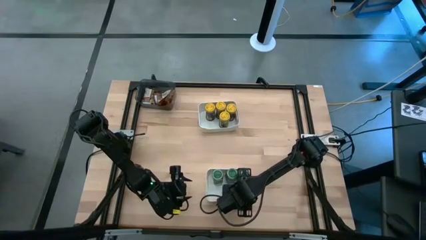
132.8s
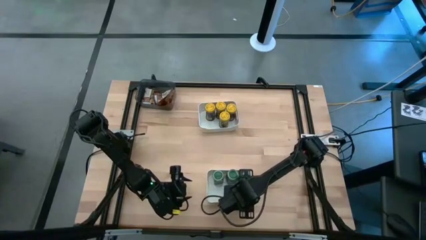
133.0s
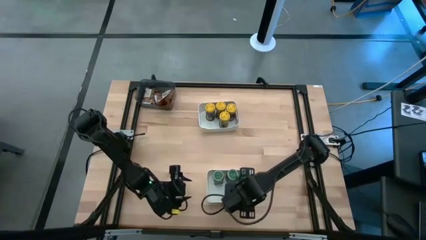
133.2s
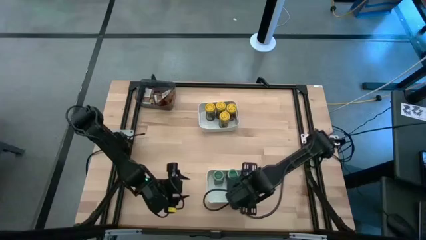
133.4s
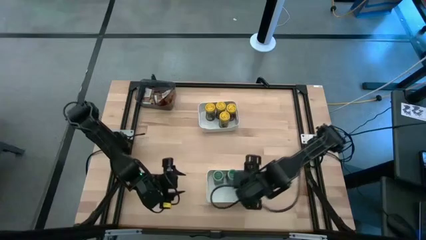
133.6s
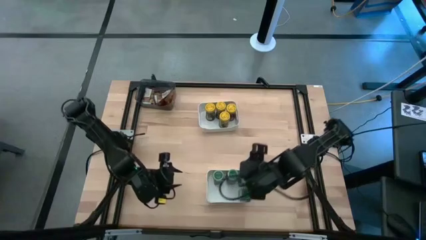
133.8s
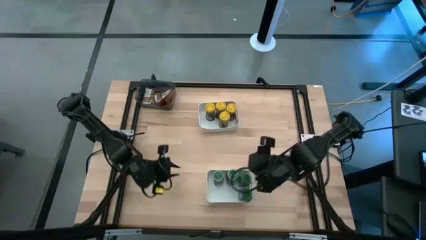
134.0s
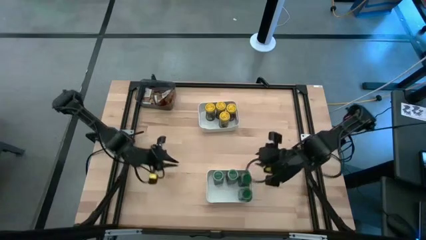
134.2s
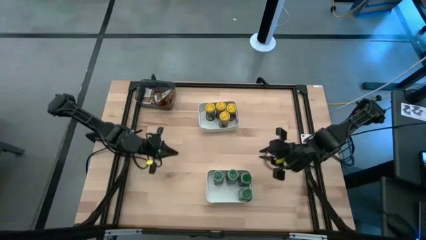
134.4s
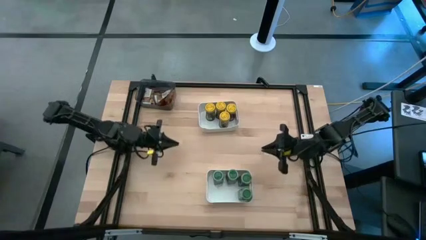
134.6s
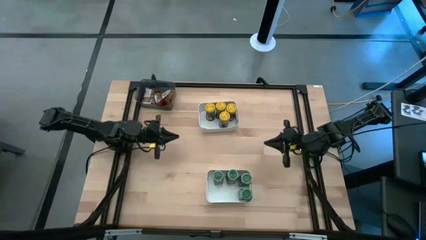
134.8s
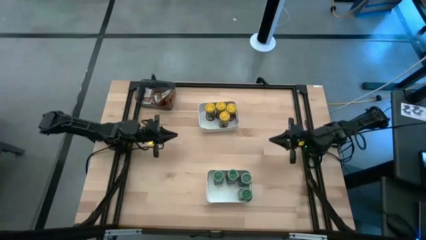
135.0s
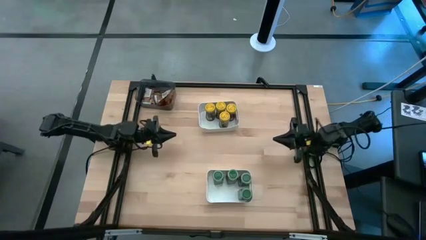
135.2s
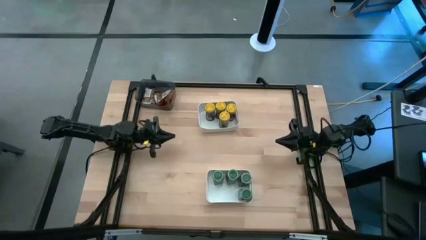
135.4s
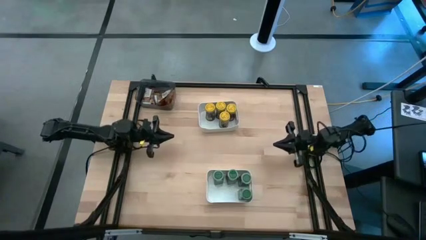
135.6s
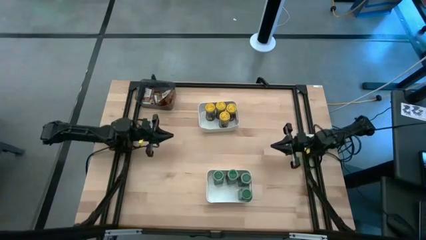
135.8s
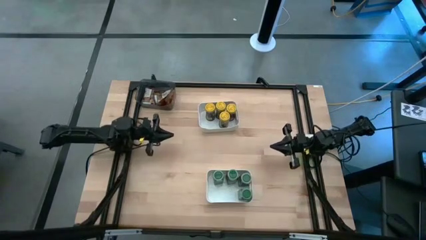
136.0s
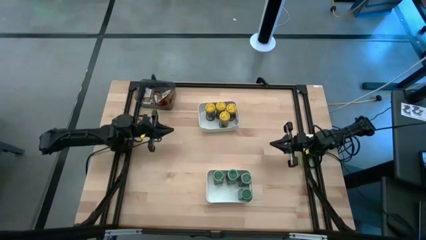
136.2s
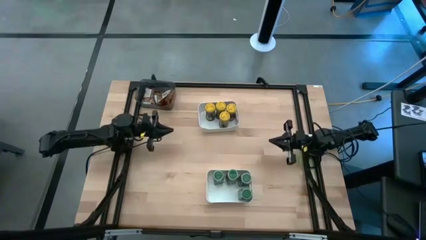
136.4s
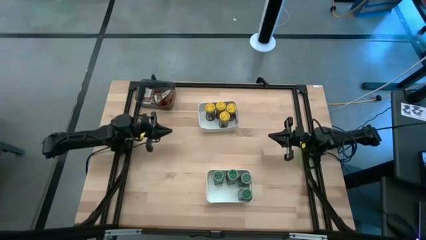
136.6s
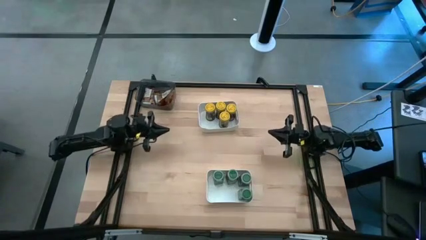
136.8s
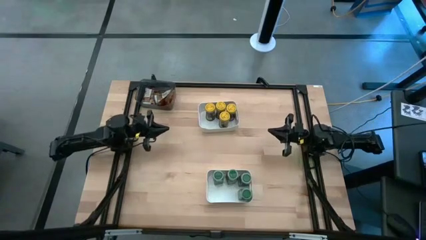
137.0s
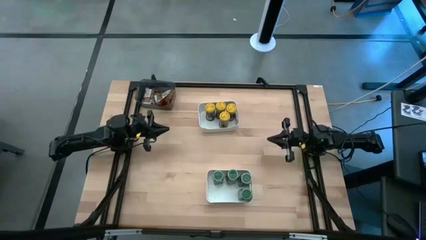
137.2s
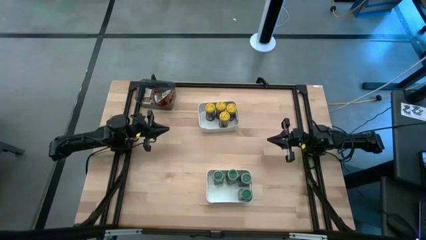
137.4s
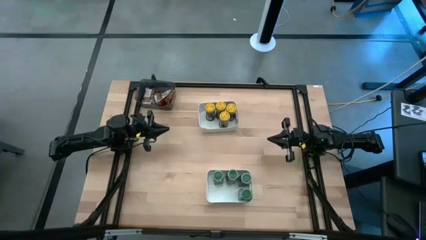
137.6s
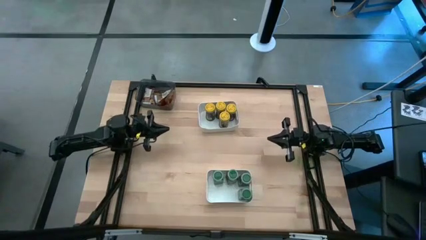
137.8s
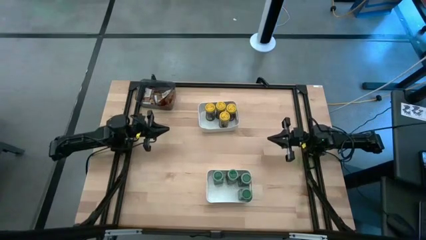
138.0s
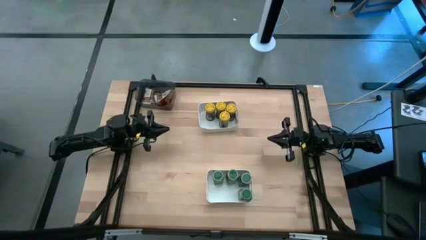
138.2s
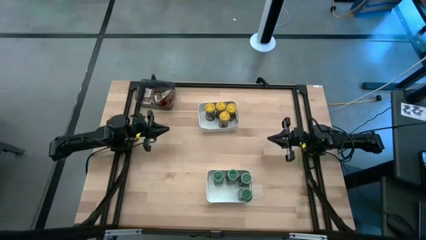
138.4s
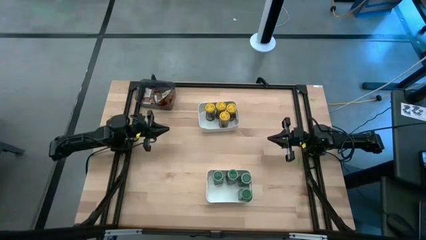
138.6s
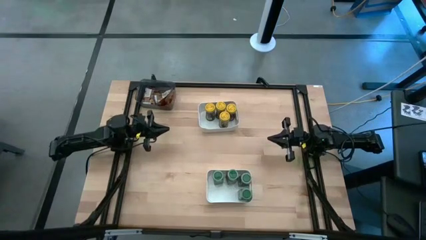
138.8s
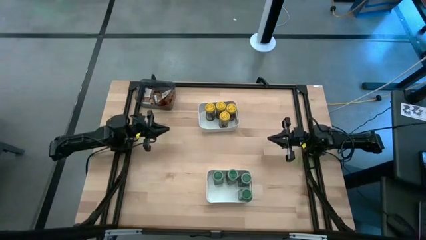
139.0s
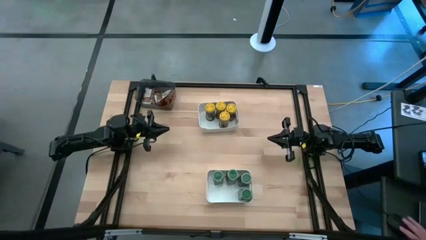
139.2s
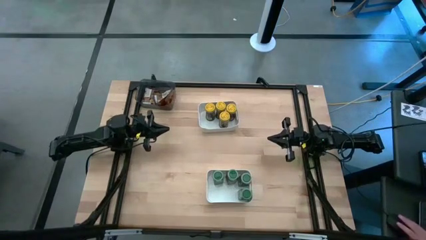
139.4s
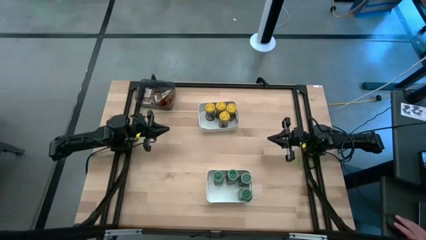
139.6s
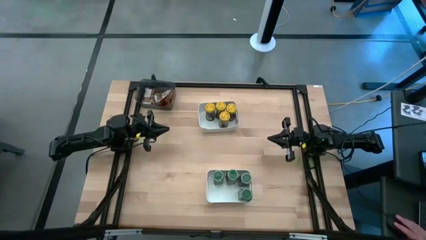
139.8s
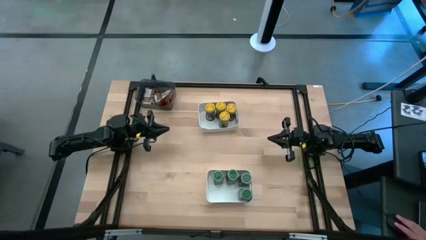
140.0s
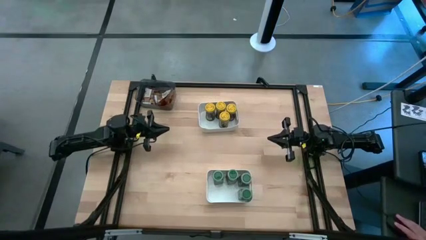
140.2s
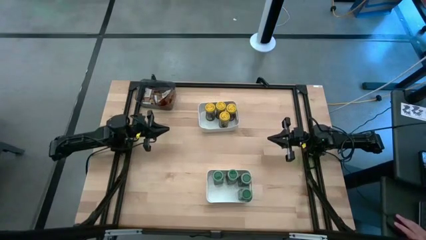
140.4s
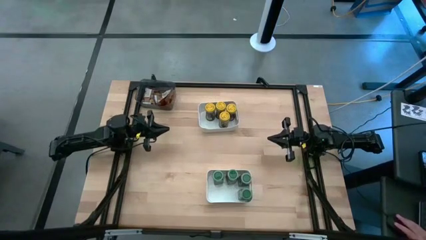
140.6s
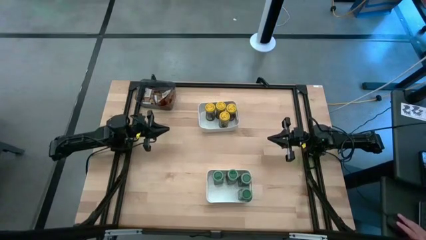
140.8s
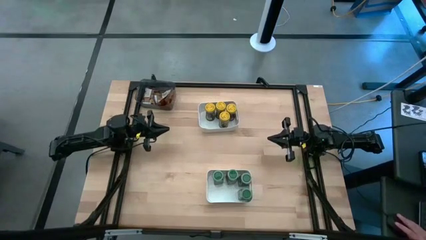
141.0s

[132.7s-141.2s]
Task: Sort spices by type
Return to Home Position

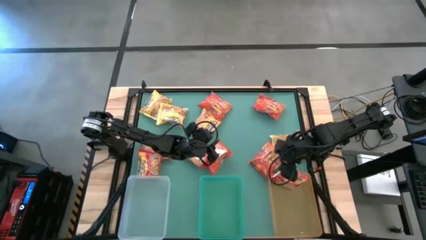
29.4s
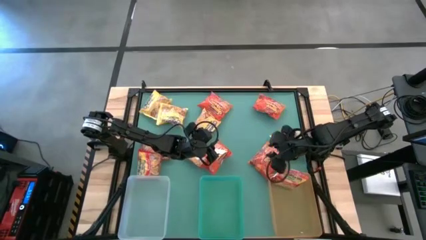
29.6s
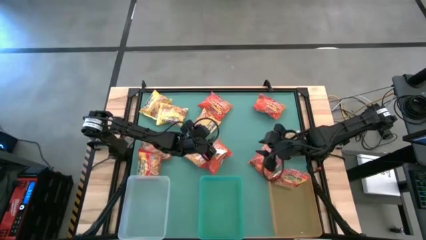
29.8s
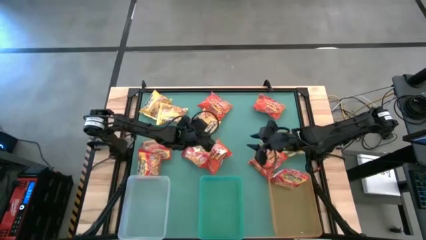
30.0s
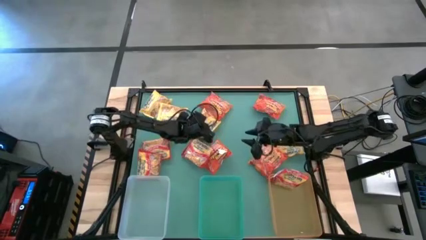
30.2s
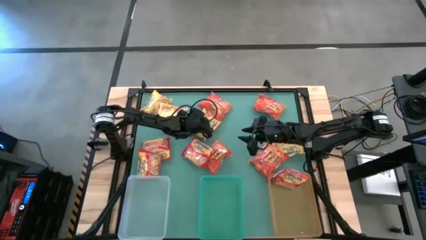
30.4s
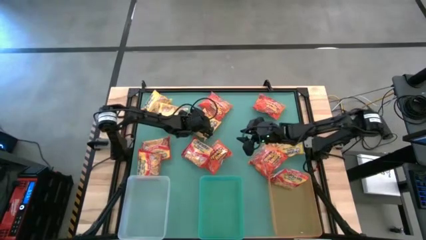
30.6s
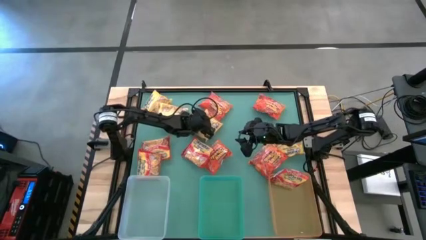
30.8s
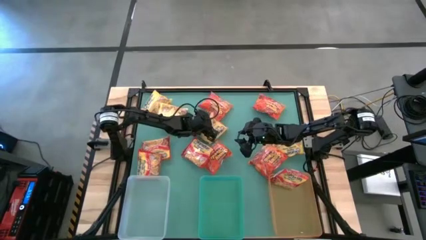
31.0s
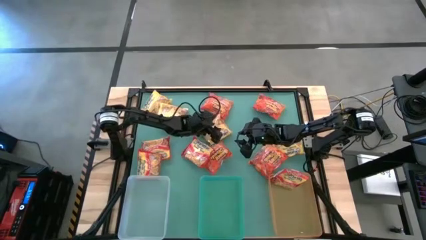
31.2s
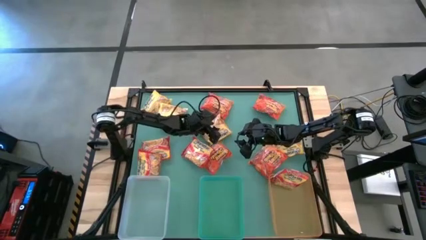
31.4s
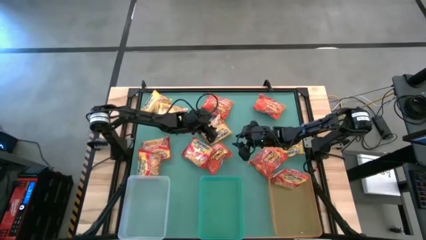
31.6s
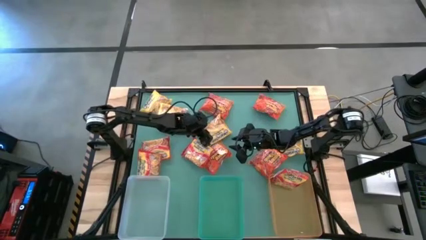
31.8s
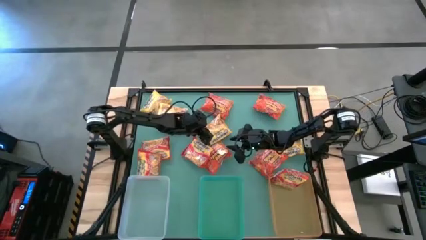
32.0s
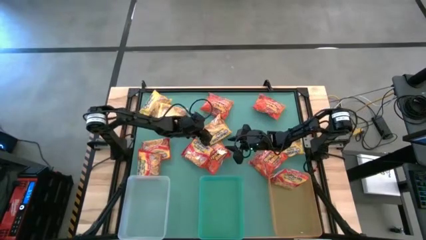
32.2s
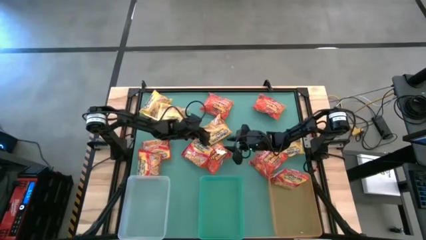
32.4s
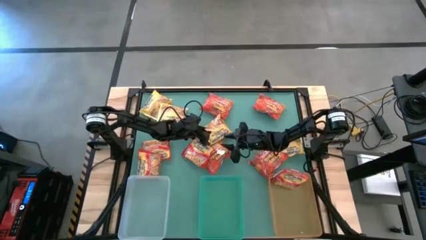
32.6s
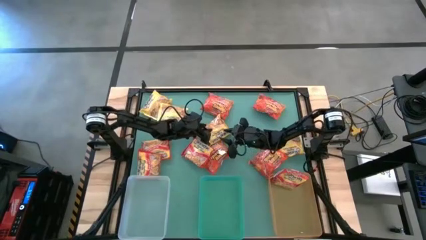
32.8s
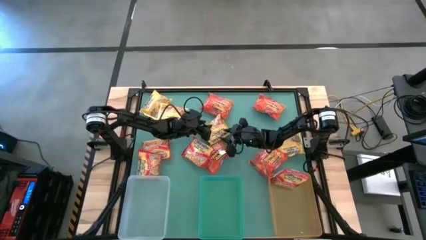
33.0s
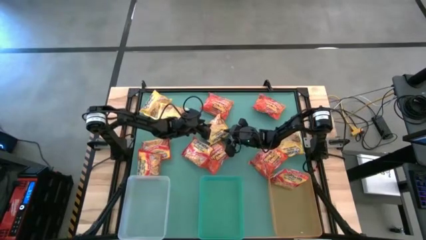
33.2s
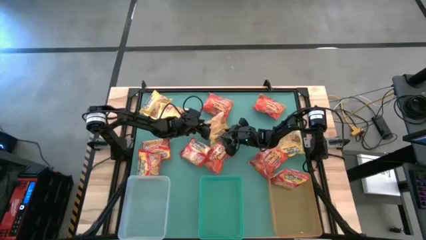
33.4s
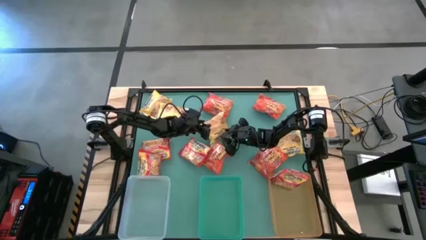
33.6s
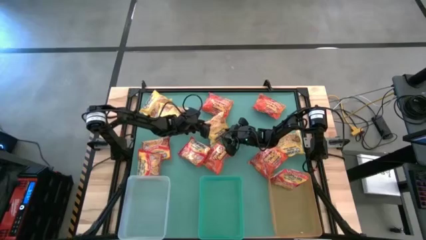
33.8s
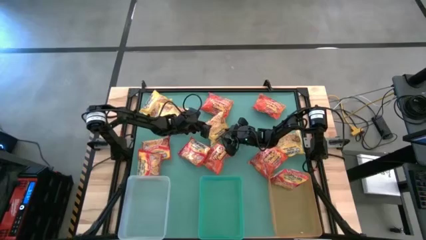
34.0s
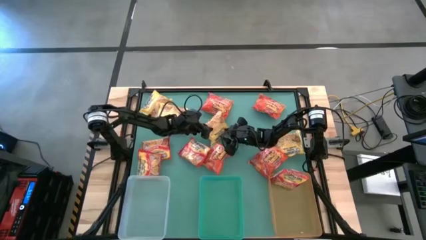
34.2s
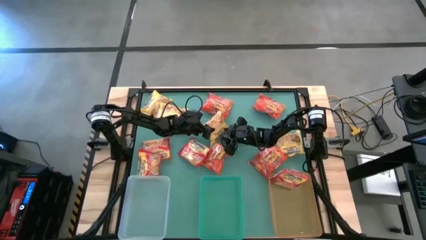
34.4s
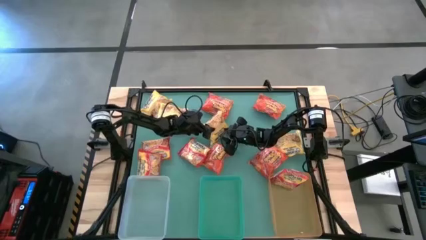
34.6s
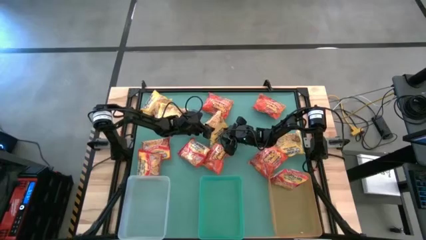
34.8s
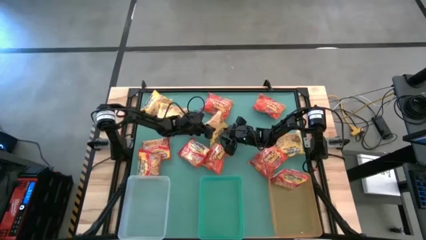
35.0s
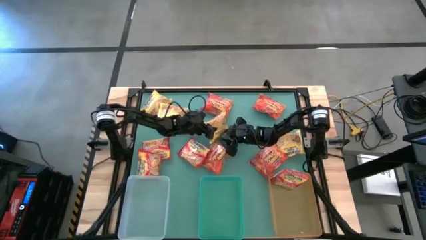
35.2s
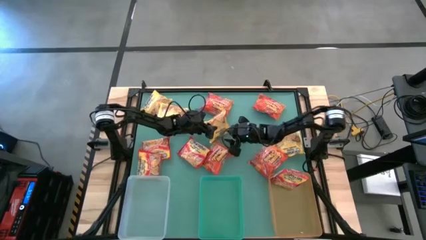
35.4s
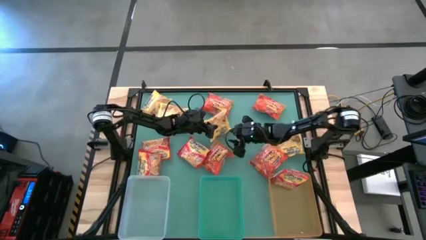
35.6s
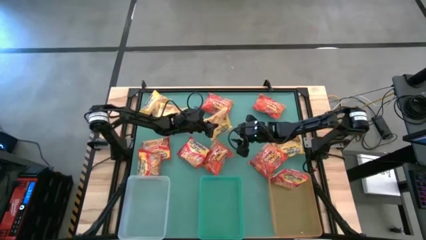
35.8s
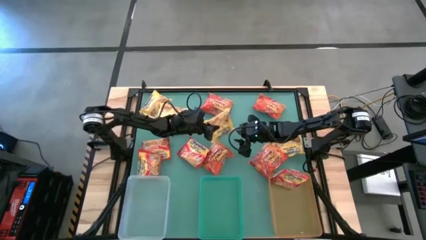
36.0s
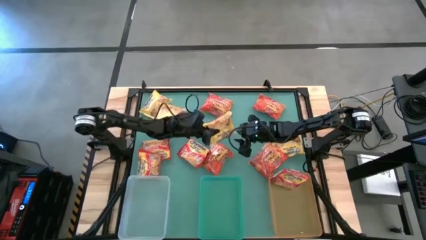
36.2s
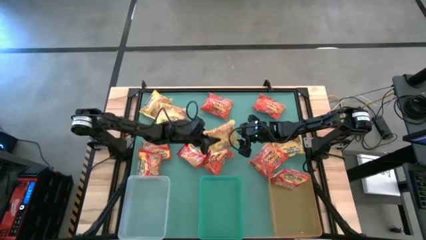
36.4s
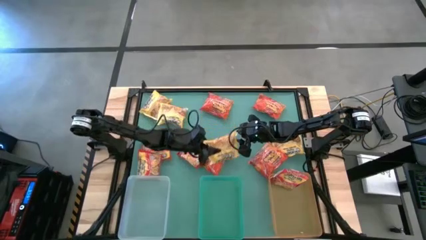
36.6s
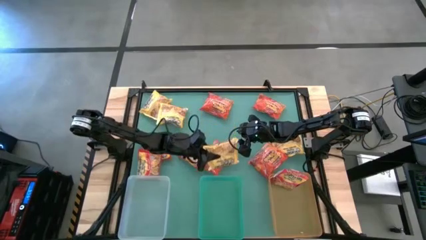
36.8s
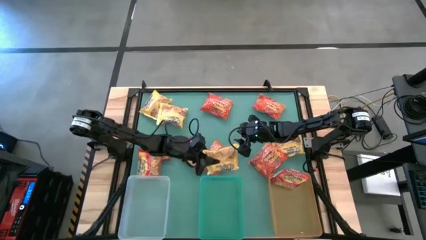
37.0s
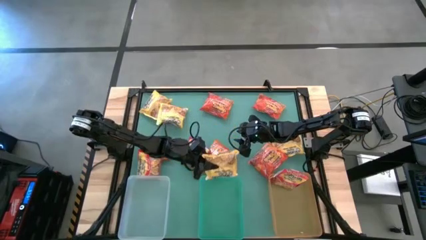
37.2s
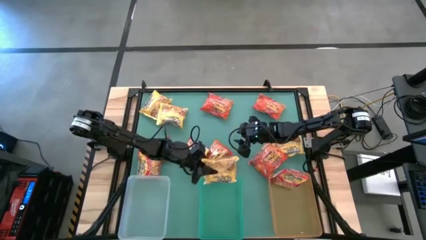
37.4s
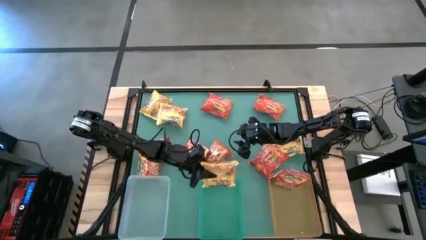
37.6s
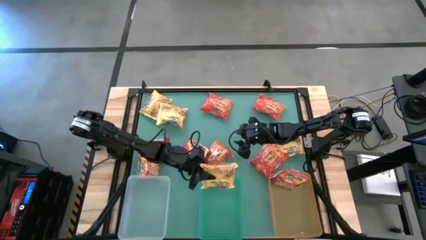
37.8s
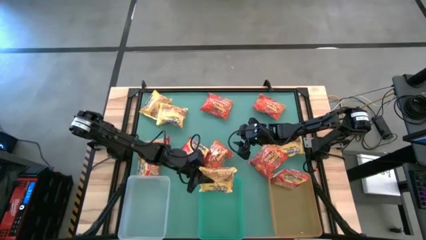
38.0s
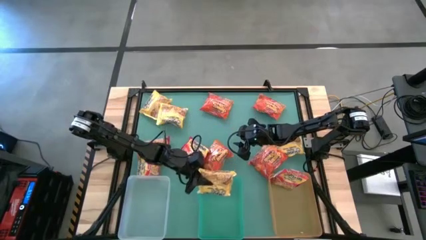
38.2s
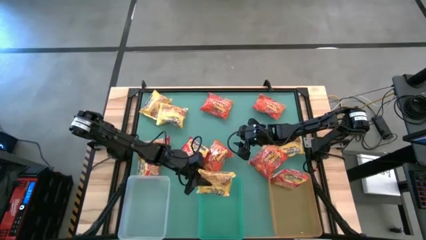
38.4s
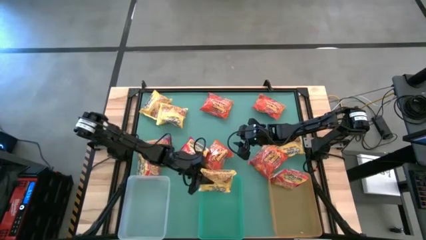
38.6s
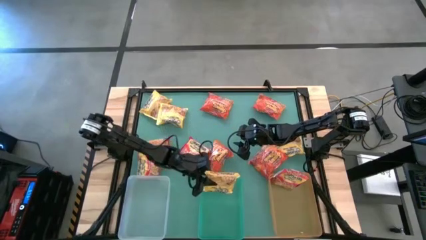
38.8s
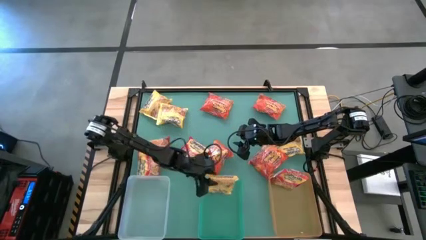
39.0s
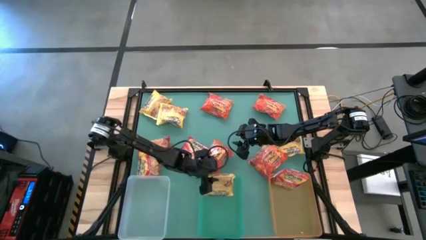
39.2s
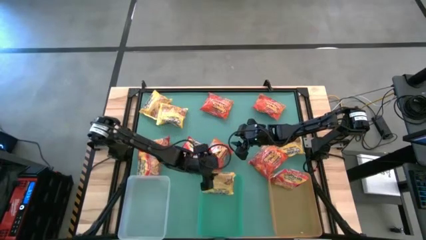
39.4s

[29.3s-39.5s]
Task: Sort Maruchan noodles
Put the yellow noodle pack into the green bin
